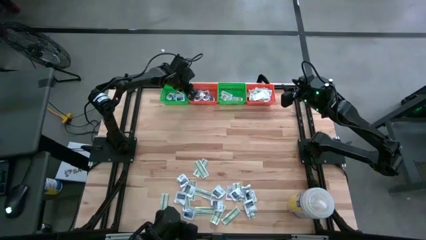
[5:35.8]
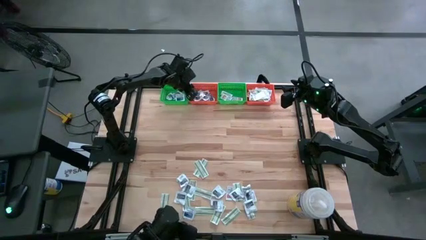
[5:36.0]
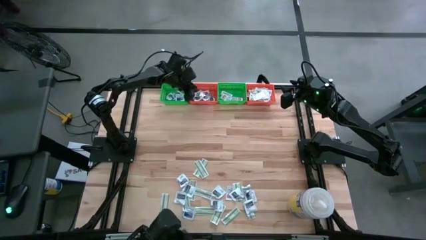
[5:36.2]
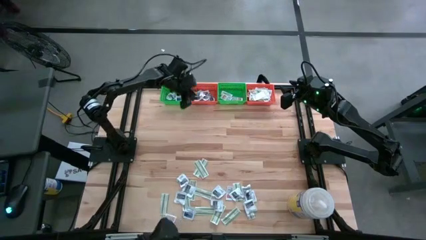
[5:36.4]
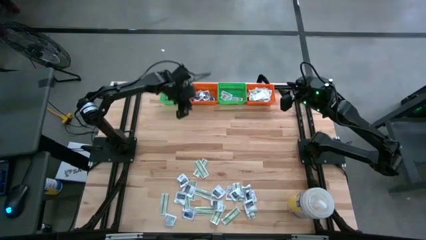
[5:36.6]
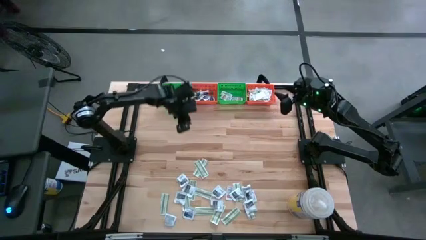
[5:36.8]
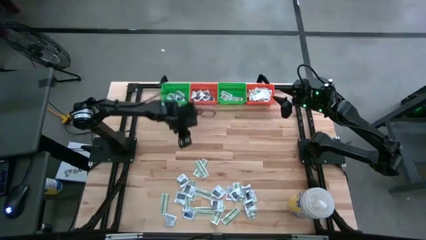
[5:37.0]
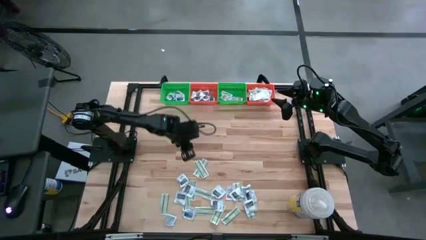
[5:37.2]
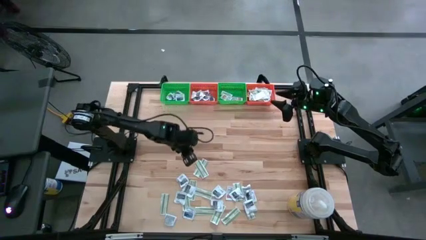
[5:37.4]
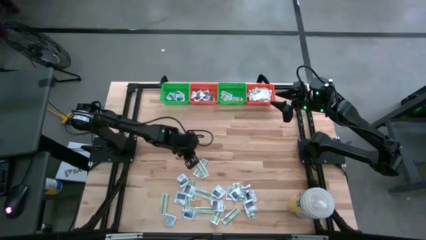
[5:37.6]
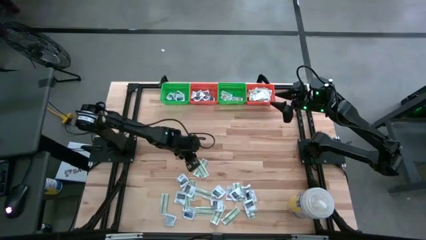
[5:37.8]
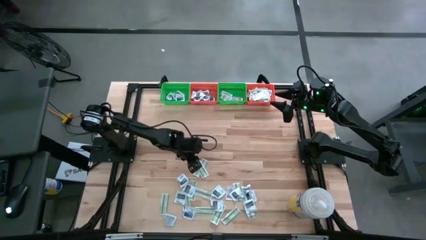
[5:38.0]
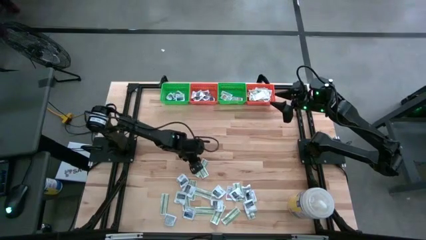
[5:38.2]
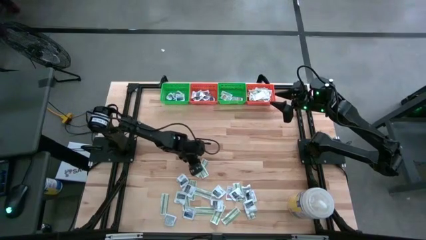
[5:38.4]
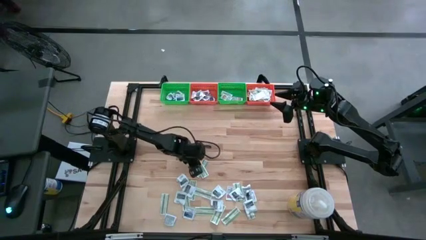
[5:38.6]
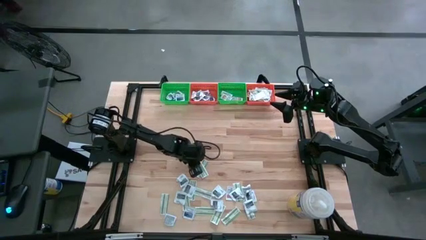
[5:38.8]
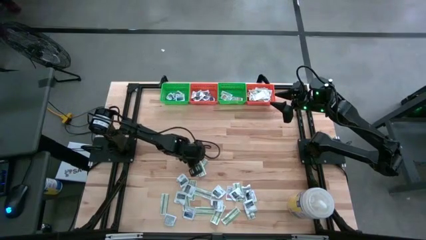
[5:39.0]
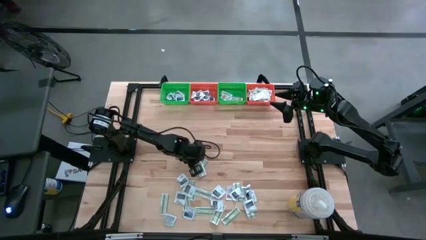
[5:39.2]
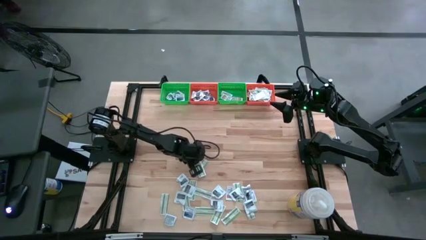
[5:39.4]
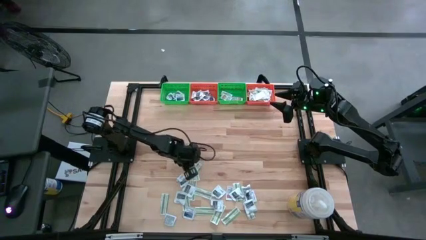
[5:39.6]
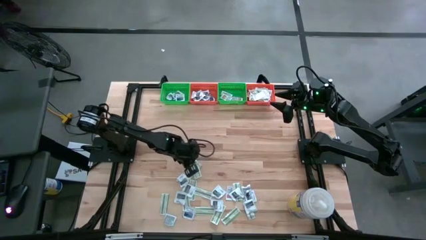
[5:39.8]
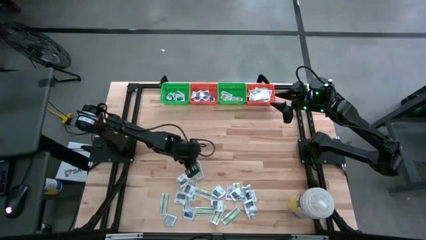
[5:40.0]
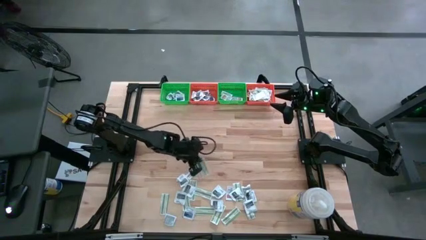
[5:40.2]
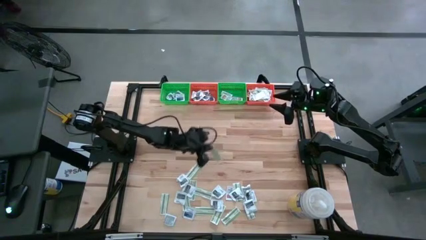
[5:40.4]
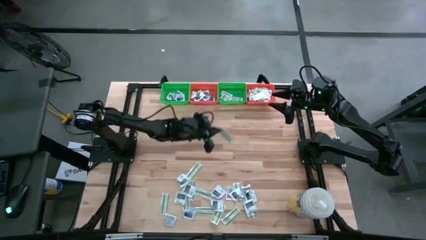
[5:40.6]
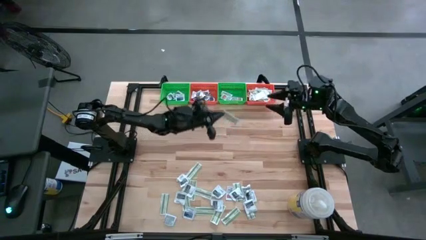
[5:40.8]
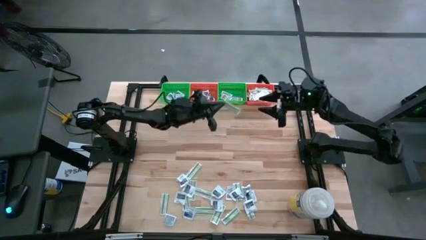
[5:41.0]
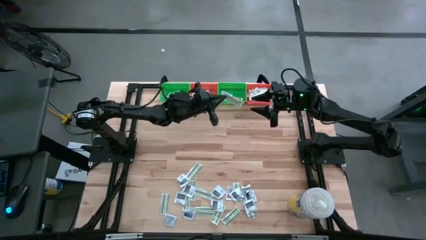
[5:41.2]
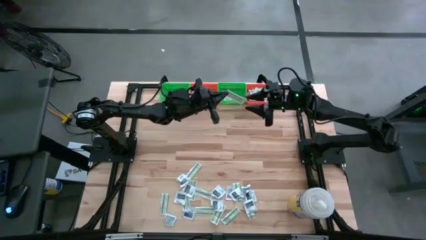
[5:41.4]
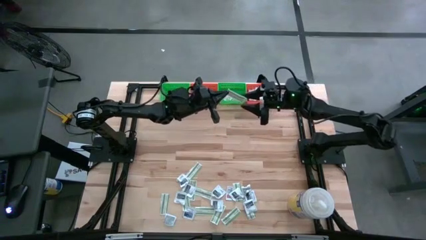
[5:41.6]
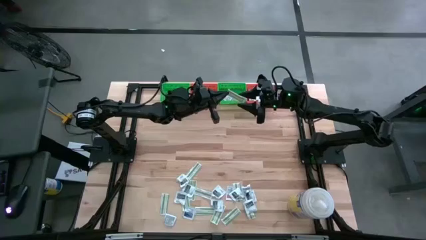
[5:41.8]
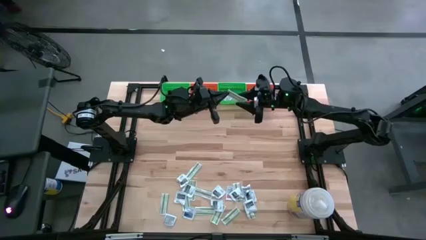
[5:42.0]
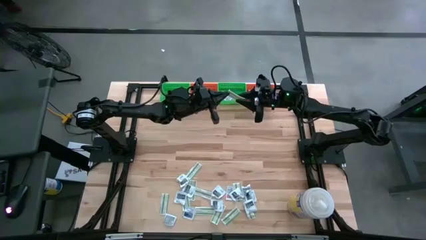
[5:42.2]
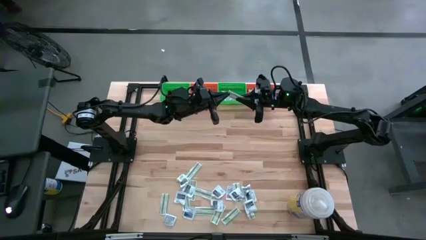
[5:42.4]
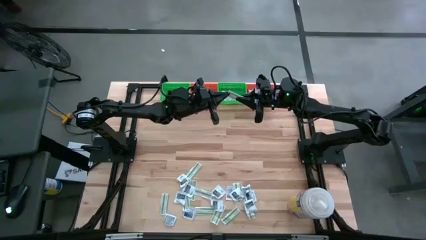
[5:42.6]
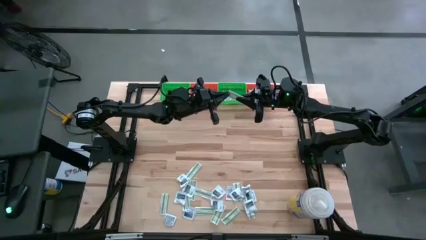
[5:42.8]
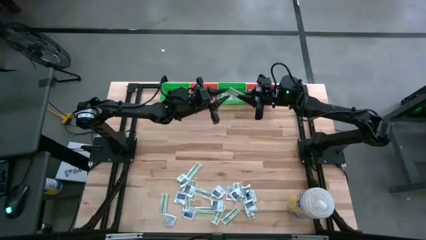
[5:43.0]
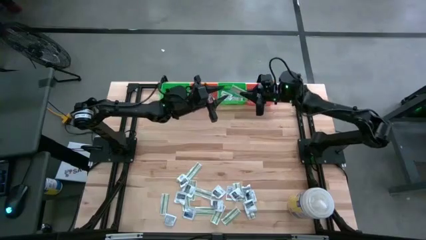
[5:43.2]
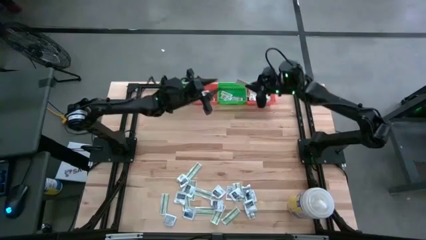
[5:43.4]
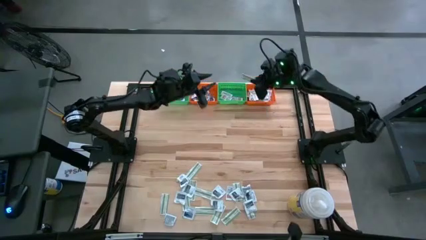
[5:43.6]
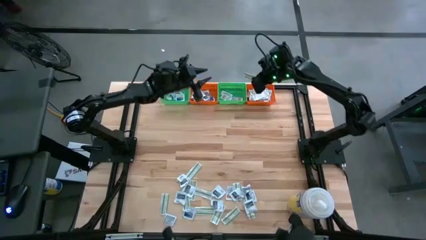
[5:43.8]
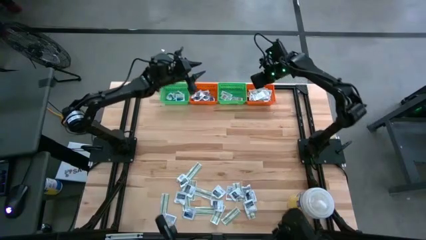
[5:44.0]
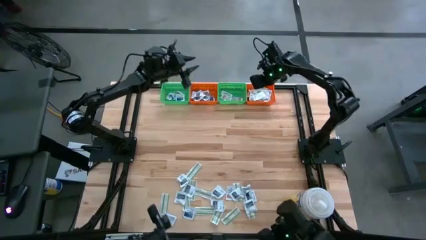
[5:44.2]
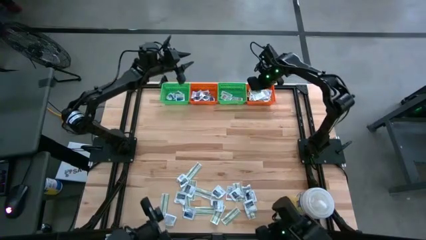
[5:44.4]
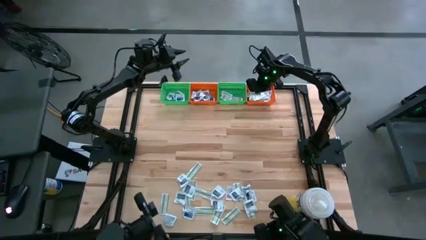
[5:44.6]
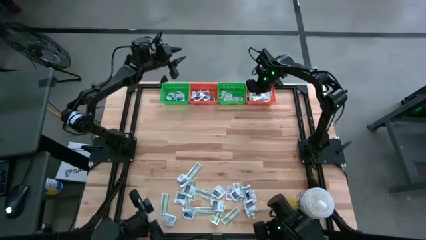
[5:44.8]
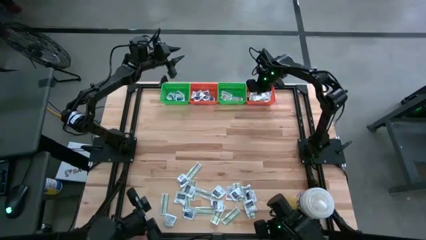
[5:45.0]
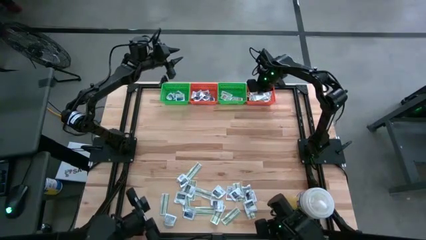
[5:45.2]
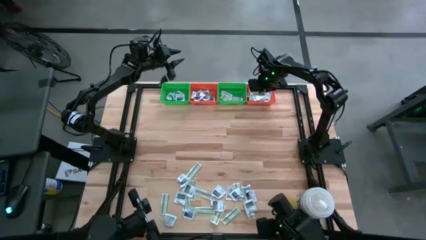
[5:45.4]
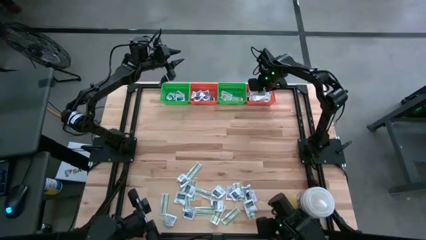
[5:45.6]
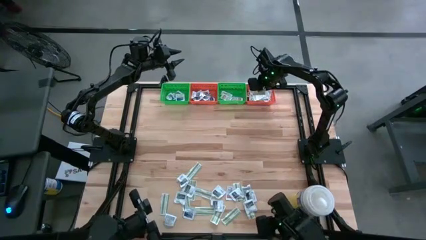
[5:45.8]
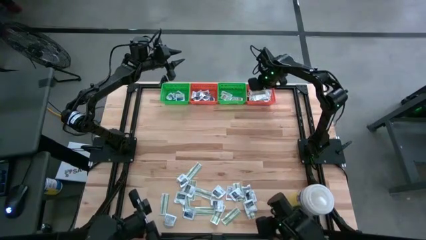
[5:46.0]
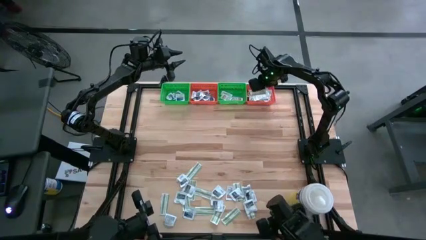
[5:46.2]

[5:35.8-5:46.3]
Task: Pick & Place First Aid Supplies
Put the green bandage pack in the right orange bin

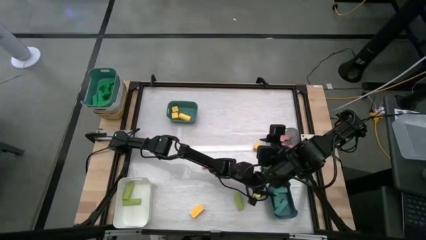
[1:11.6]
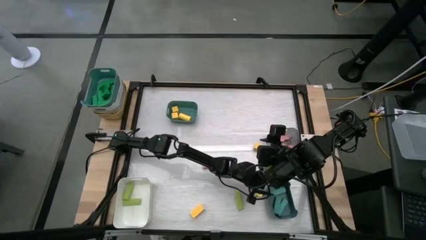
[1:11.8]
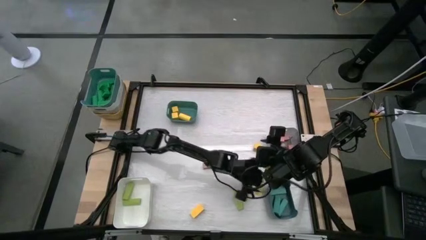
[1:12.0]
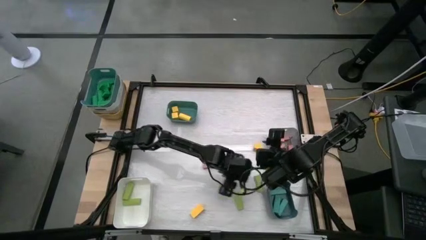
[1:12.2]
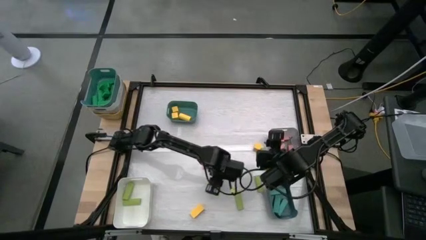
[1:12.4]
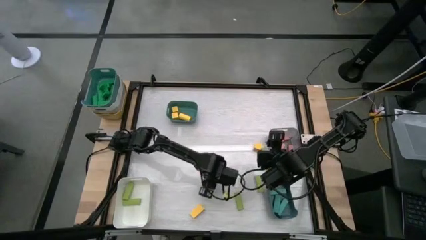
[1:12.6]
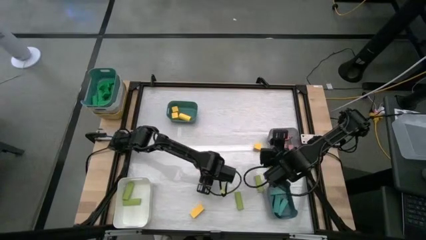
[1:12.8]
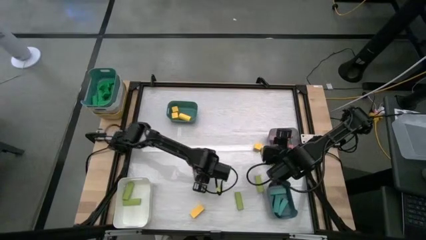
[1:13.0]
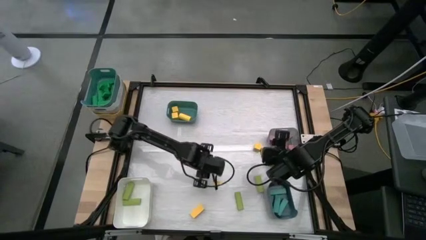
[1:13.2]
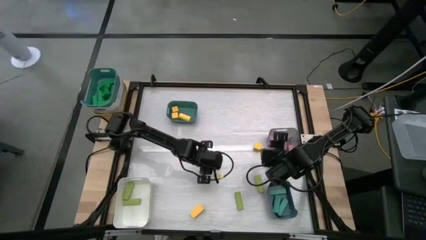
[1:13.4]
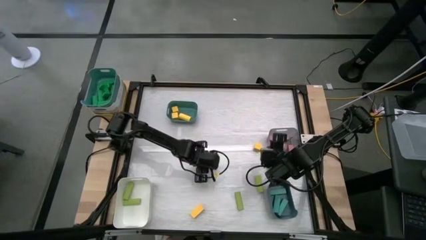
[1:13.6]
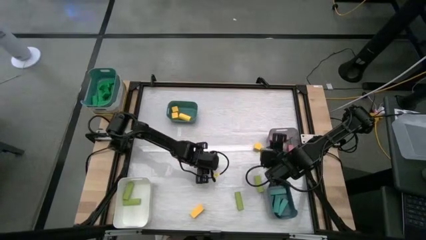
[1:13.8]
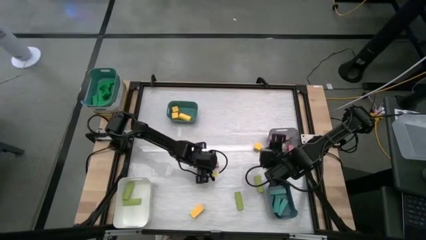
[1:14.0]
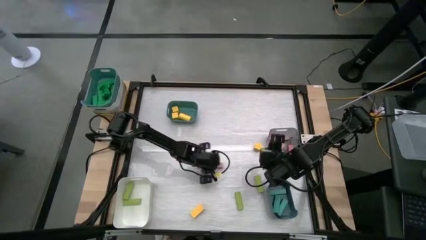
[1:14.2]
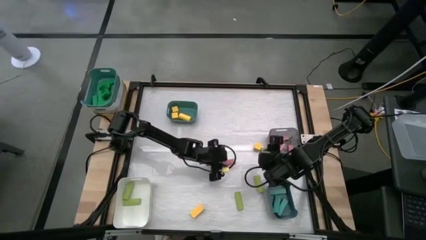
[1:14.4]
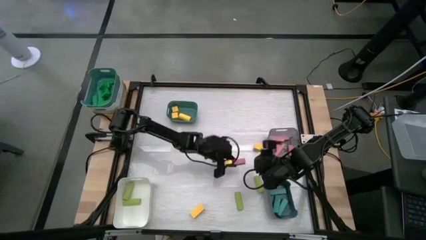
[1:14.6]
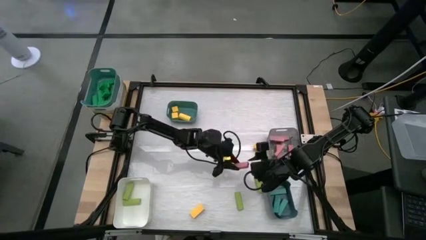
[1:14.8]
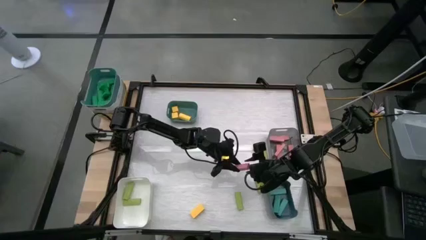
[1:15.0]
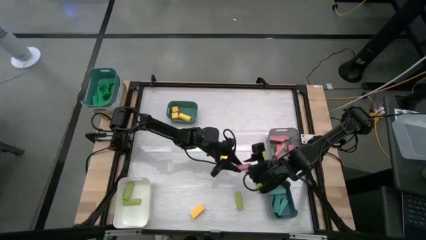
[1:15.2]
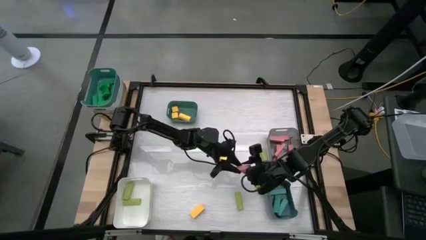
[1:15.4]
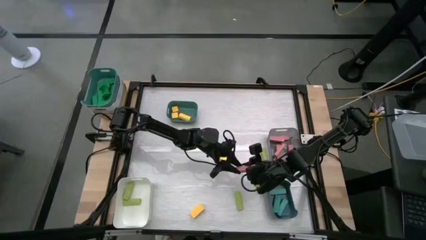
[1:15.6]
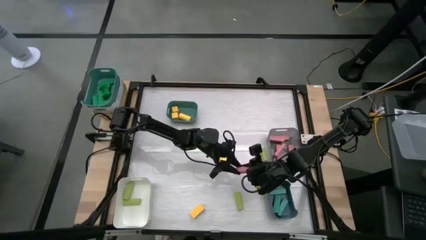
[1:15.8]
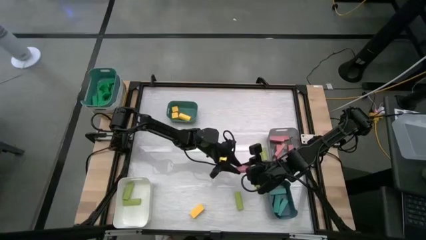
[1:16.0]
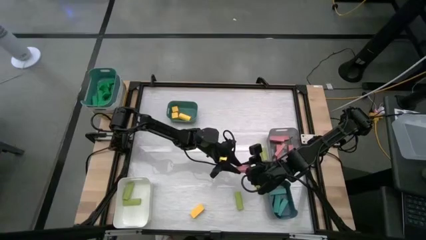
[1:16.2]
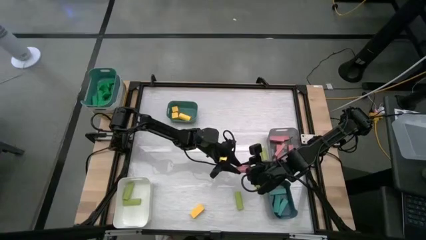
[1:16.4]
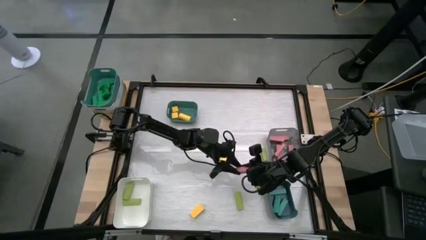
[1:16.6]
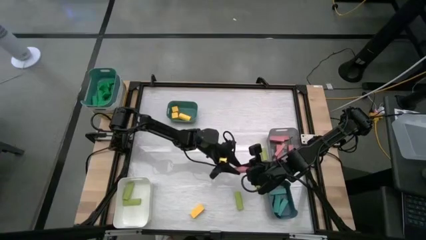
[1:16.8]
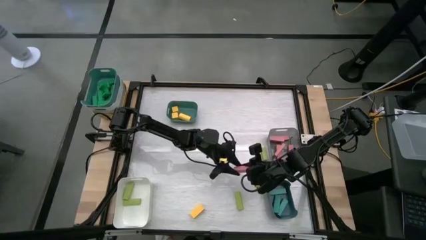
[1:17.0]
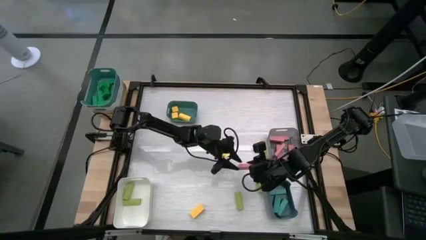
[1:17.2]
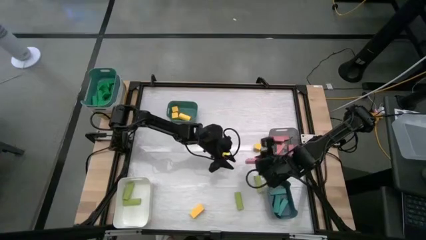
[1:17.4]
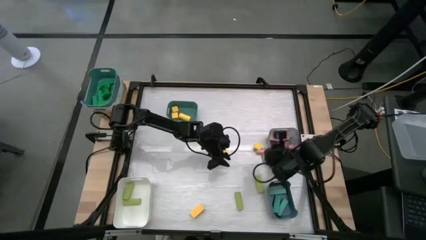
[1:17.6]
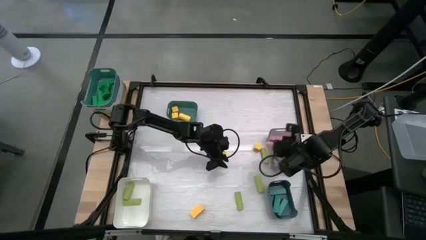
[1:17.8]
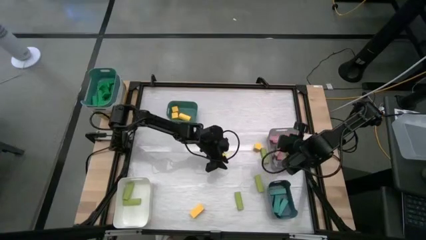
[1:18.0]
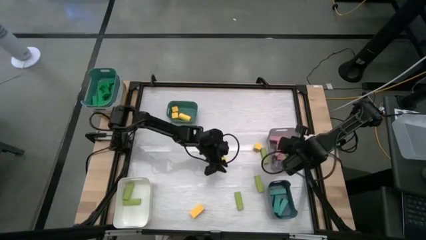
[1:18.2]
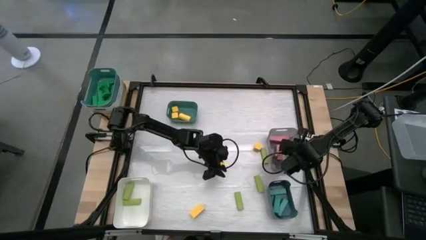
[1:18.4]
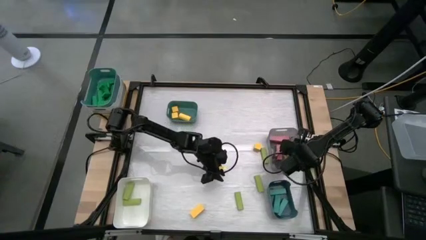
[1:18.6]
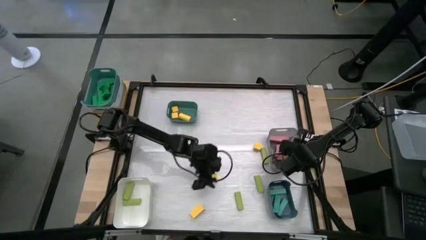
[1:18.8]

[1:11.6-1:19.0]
Task: Sort blocks
Put the pink block into the black bin
